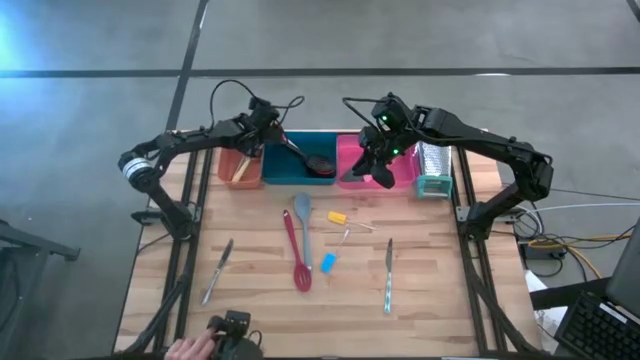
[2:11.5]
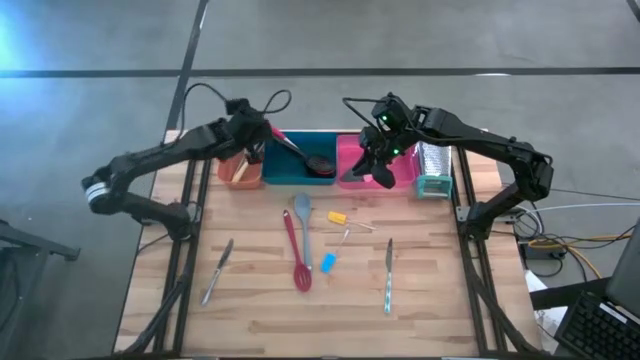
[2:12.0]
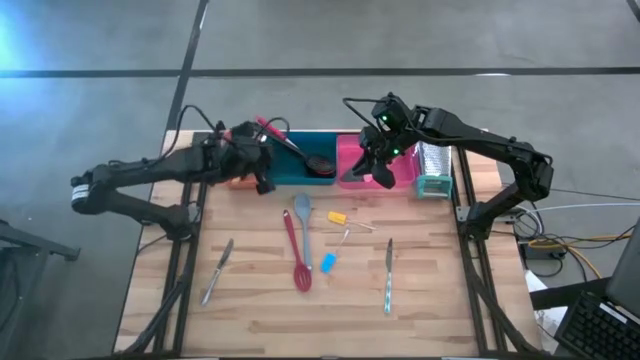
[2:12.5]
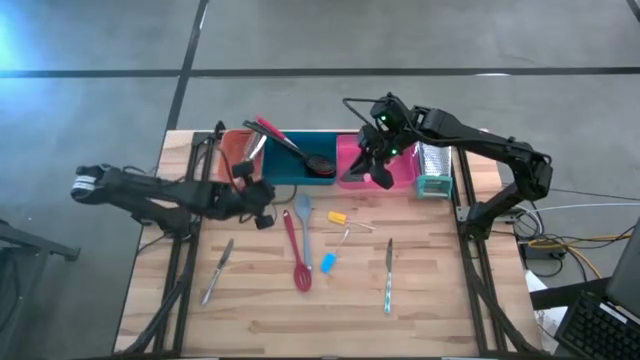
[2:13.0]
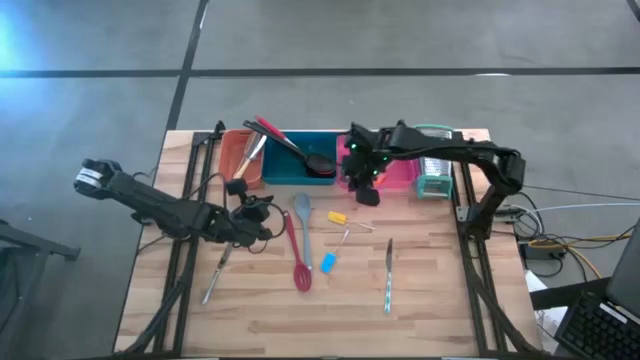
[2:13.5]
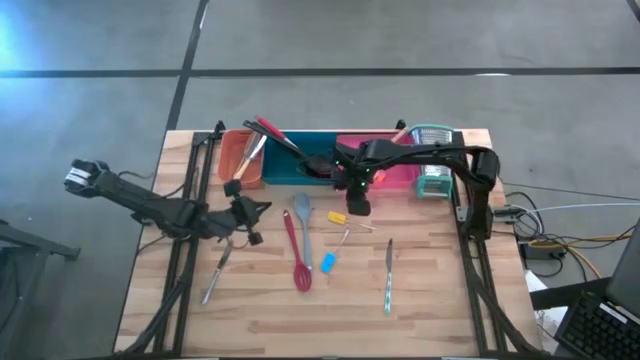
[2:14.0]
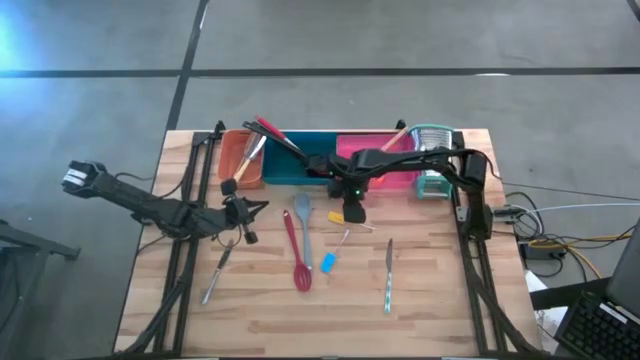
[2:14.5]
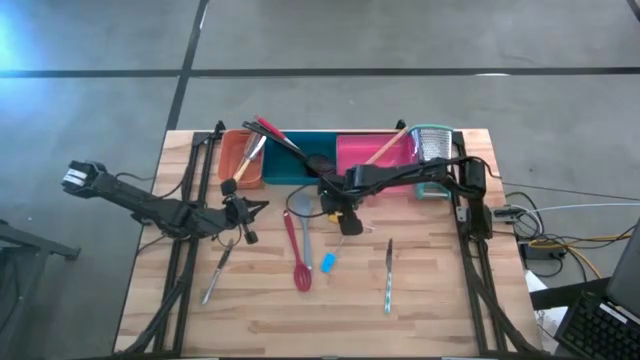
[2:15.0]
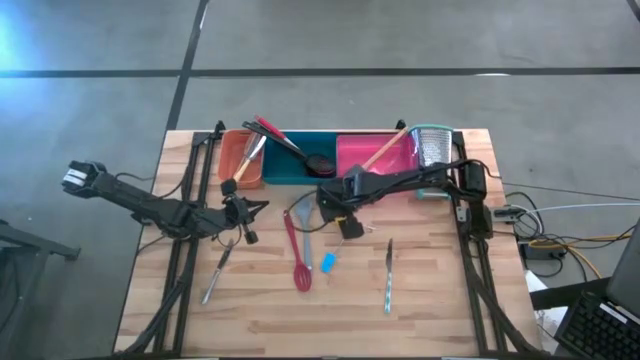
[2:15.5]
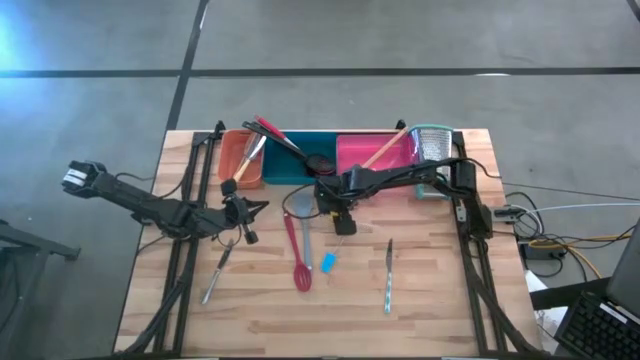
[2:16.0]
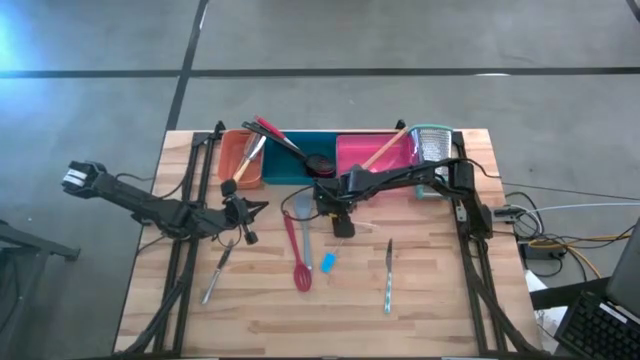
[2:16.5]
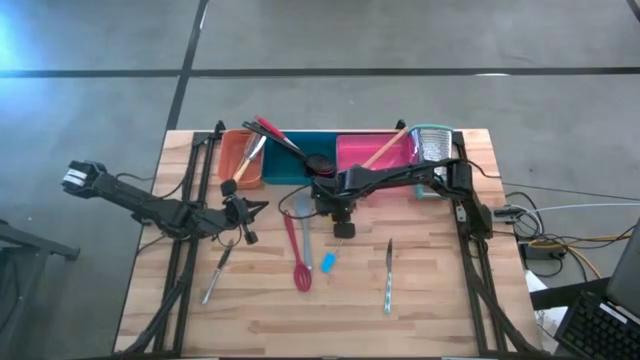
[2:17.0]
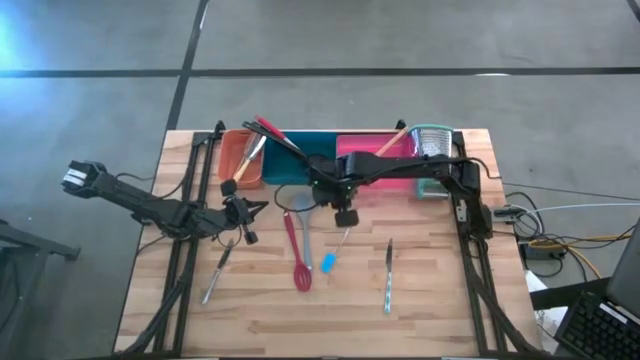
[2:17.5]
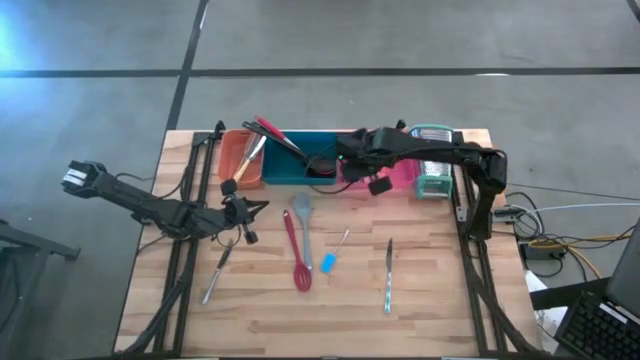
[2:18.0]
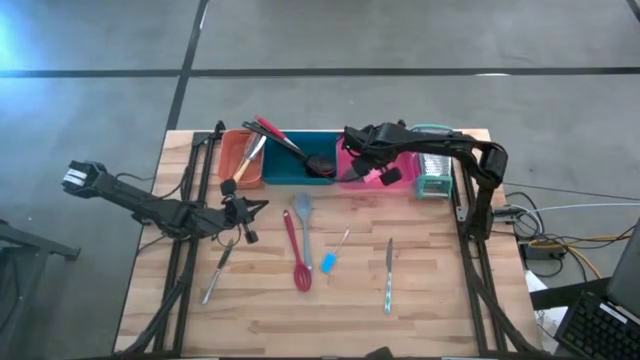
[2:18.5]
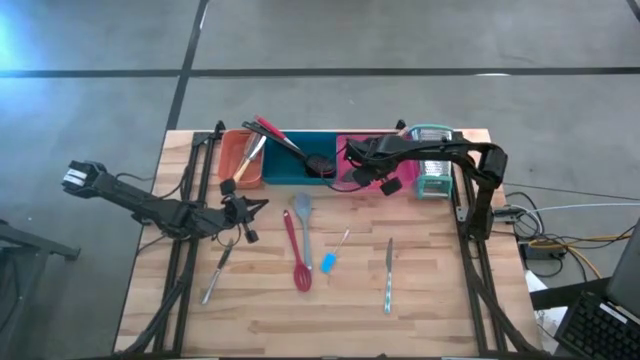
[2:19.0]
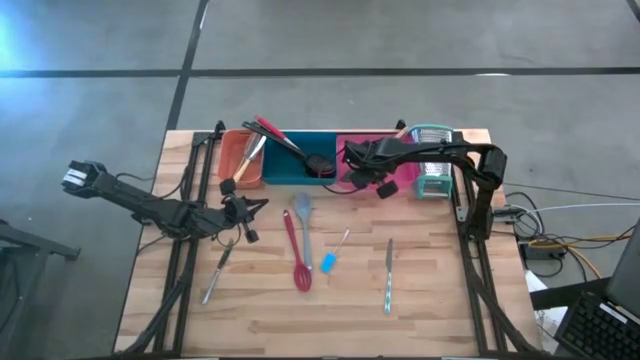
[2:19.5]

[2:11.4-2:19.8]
Task: Pick & Place Kitchen Items
Put the yellow spatula into the red bin

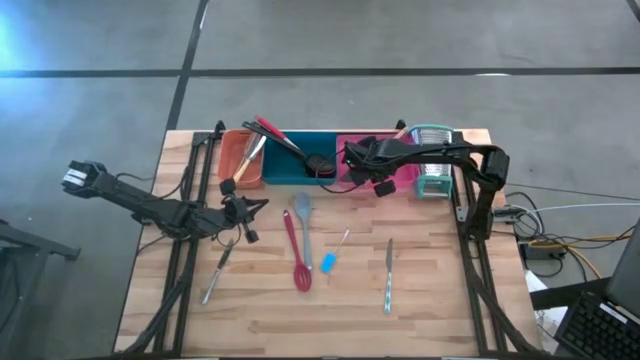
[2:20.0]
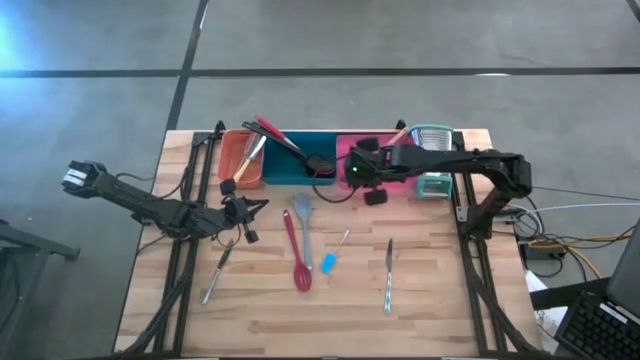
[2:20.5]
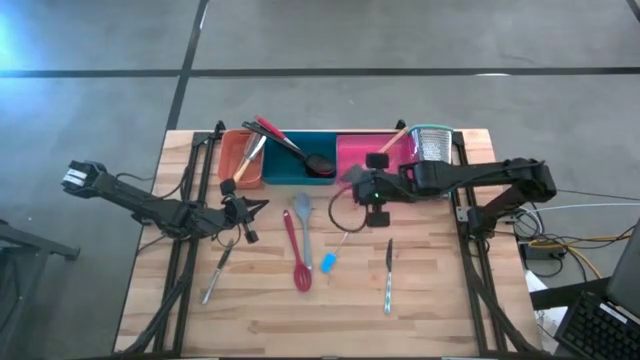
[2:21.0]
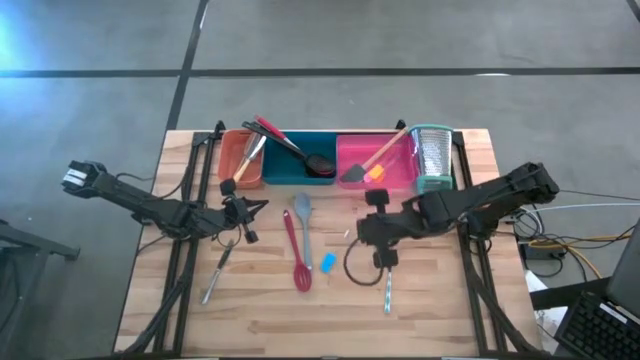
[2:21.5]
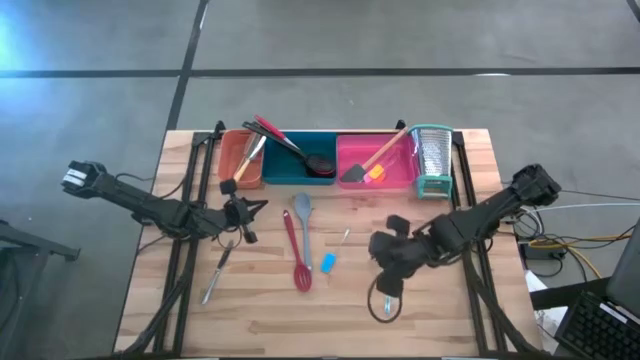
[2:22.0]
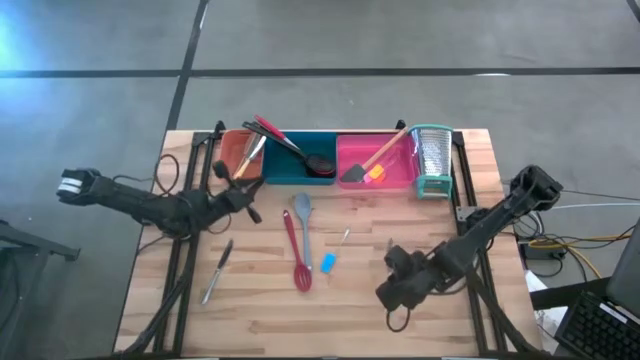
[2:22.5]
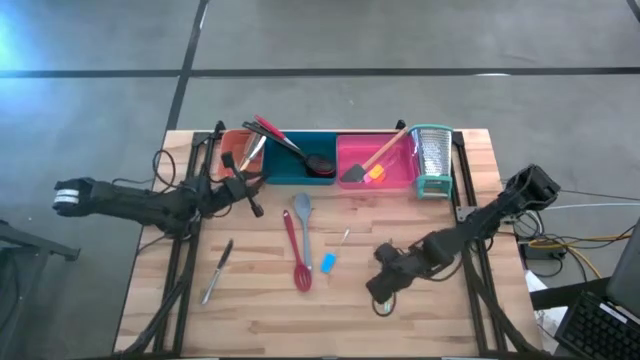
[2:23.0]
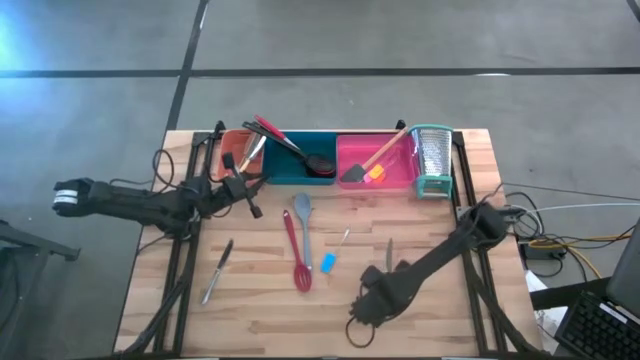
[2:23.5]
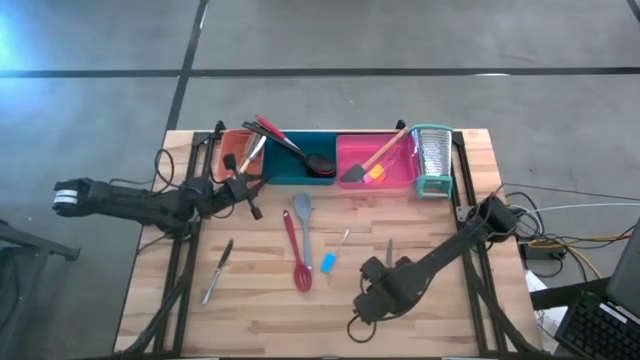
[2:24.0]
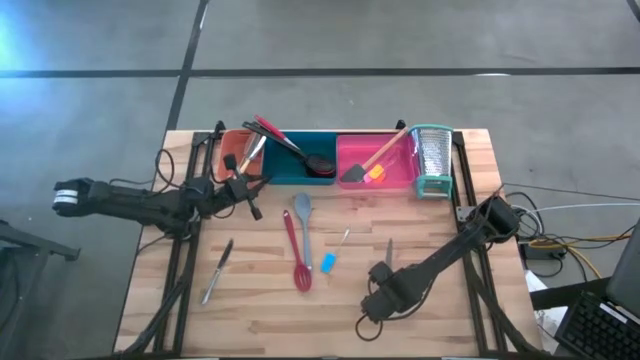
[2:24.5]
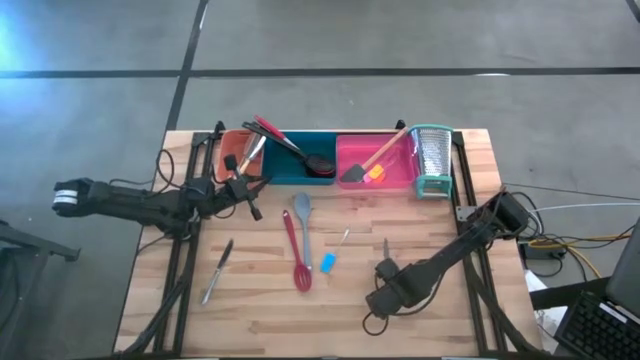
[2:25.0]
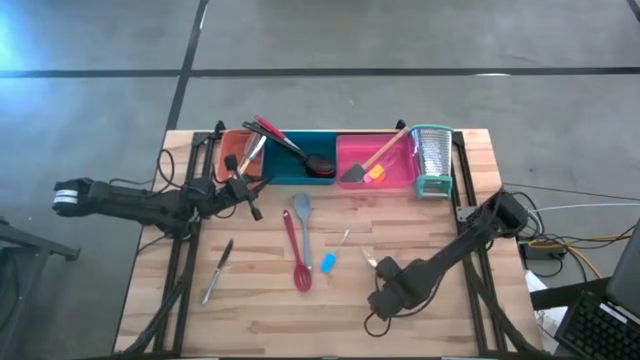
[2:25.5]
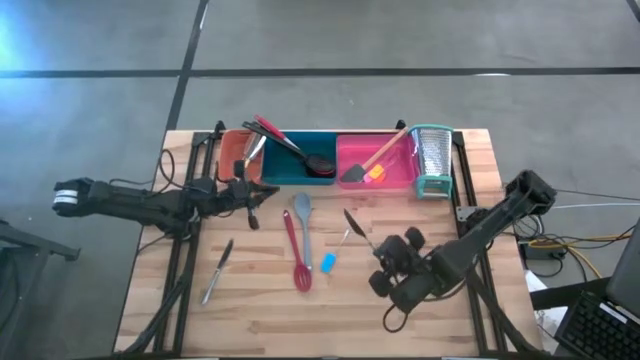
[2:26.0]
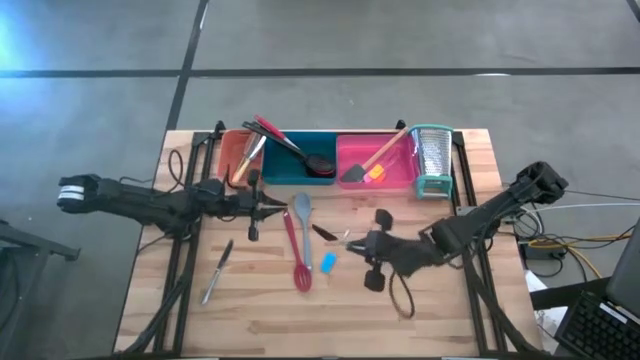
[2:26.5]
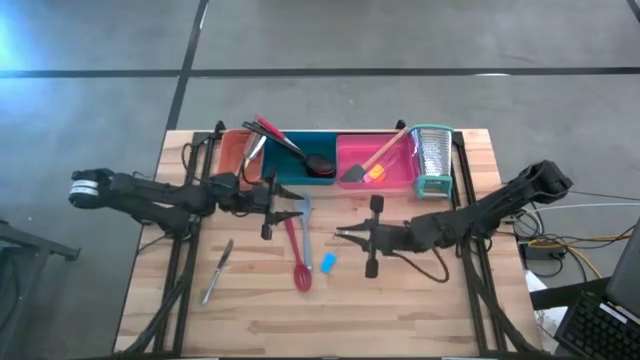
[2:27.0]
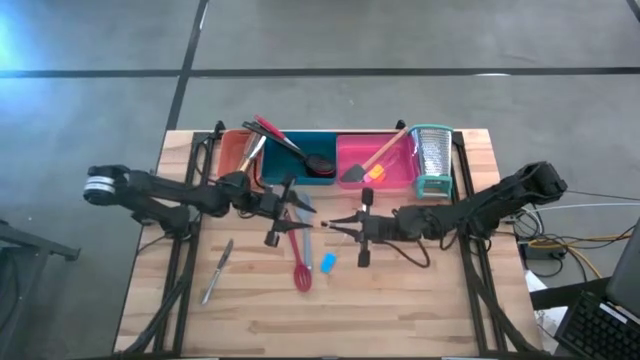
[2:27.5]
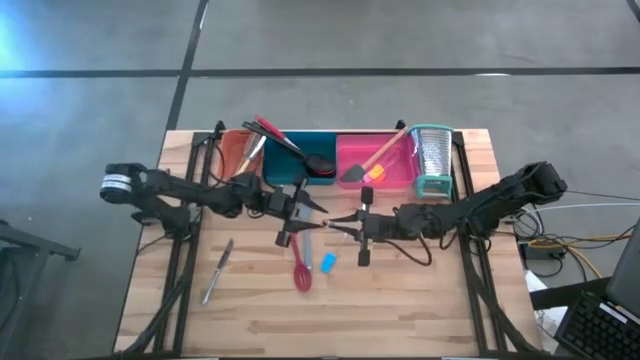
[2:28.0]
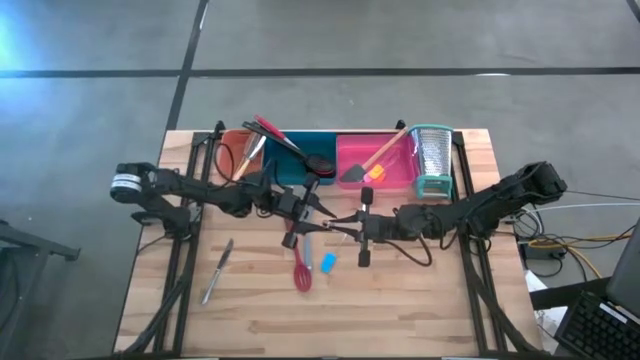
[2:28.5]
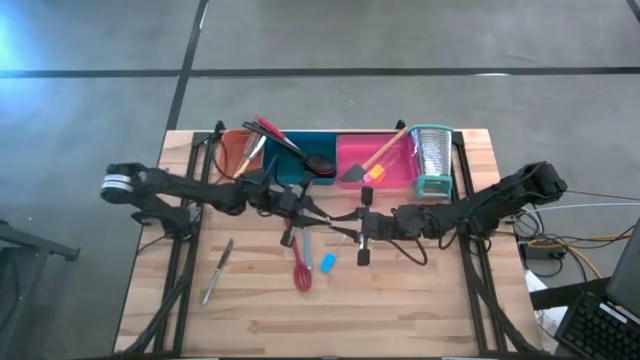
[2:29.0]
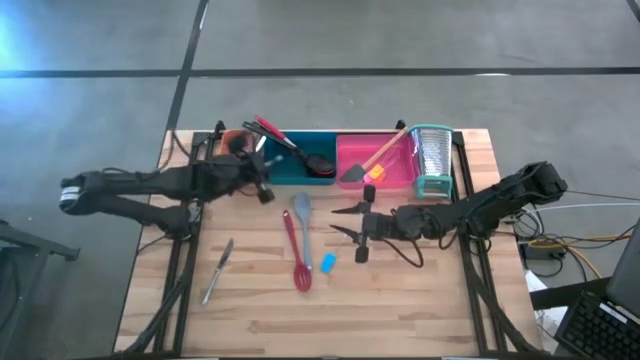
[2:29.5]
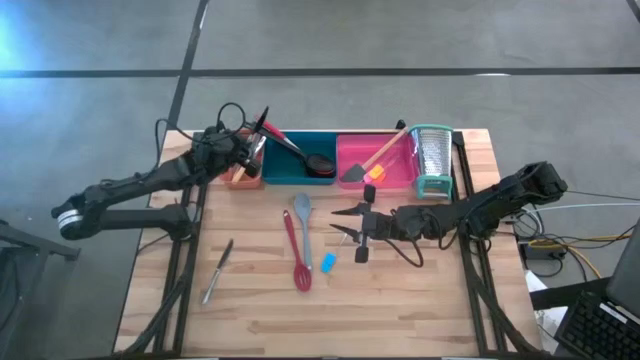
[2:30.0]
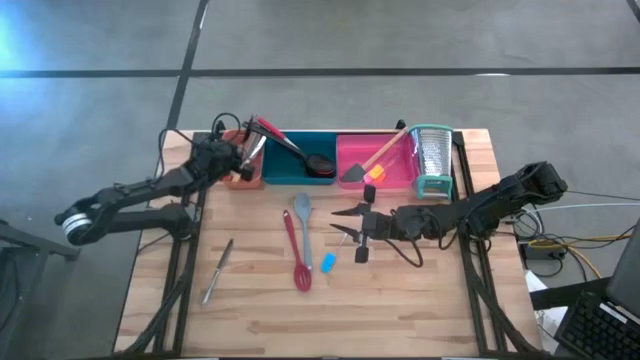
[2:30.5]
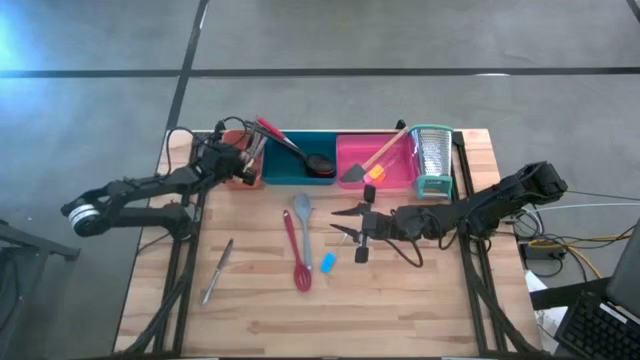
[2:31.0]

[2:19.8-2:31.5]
Put the white patterned knife into the orange bin

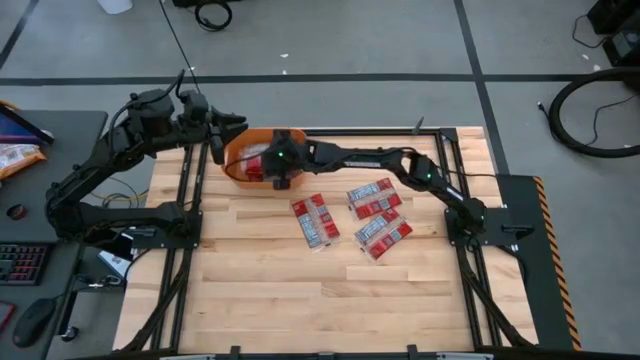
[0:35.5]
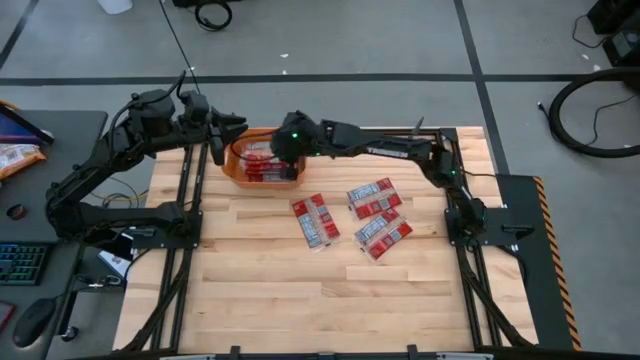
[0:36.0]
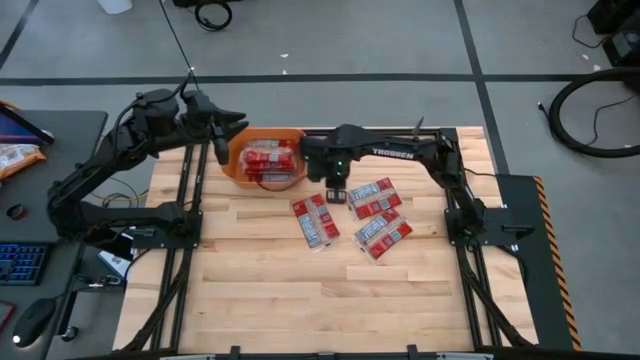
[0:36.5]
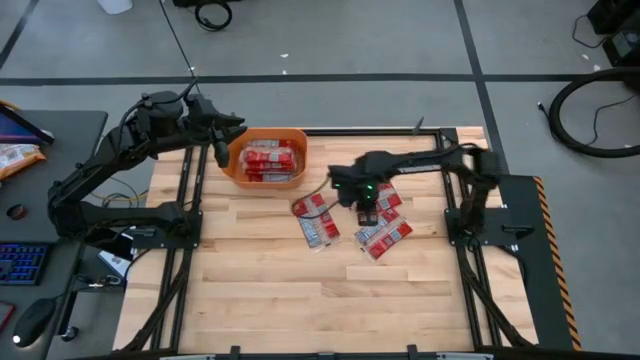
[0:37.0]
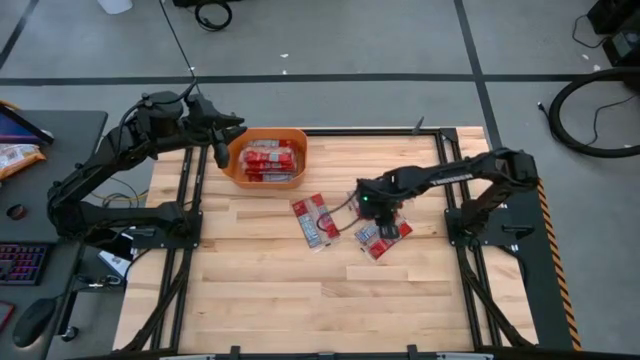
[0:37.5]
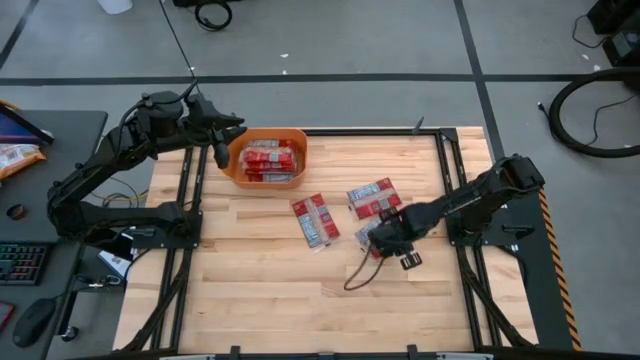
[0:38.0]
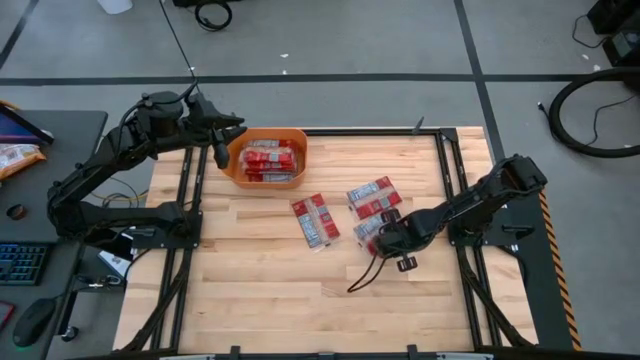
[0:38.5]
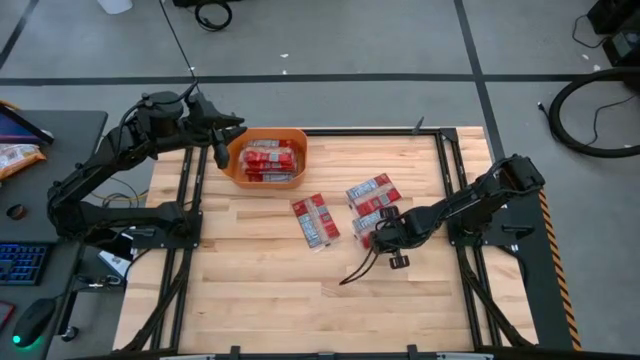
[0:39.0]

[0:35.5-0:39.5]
Task: Sort popcorn bags into baskets
Put the bottom right red popcorn bag into the orange container
